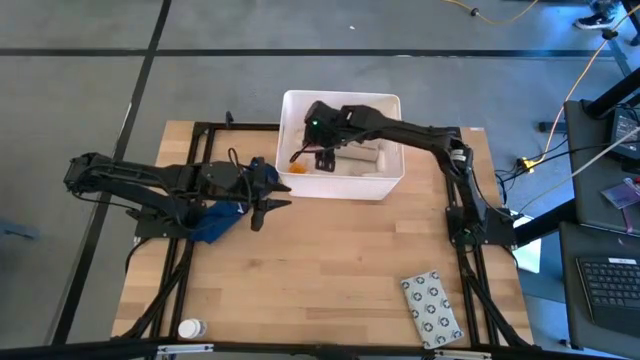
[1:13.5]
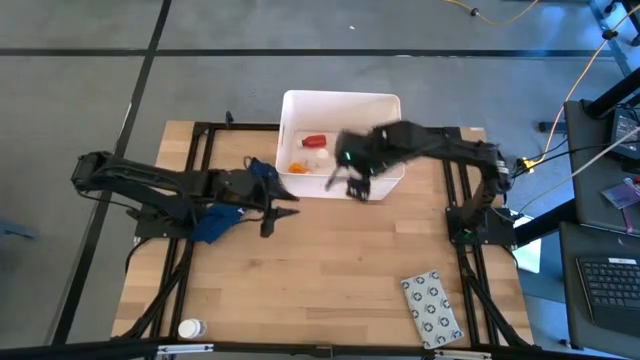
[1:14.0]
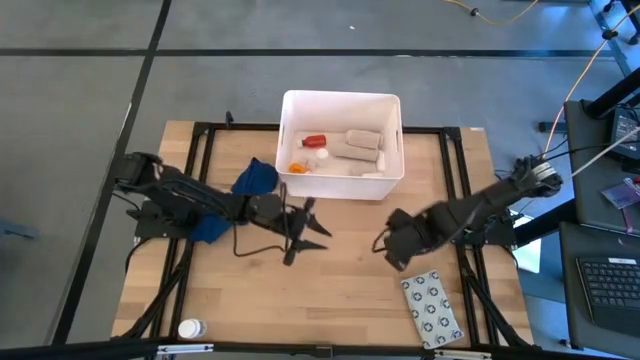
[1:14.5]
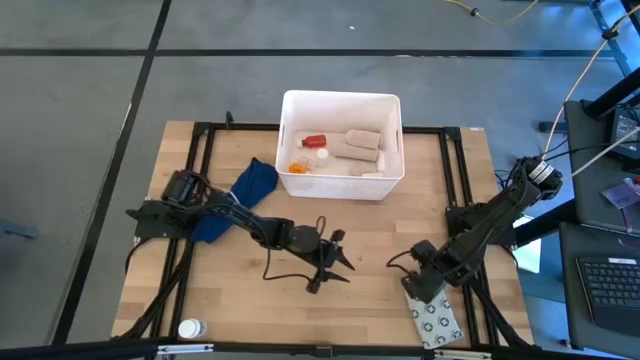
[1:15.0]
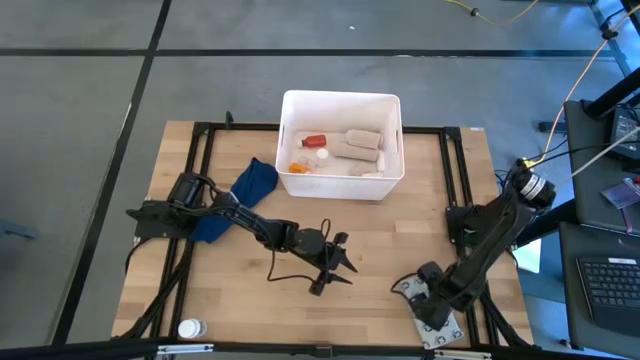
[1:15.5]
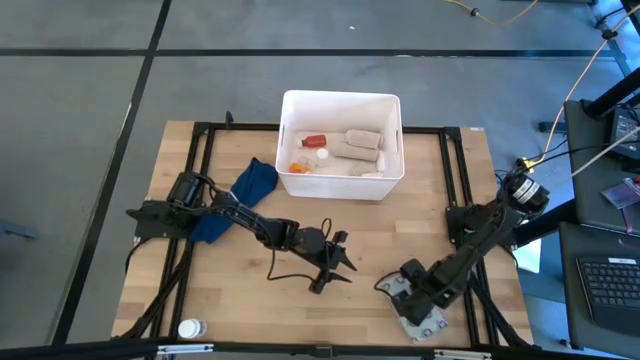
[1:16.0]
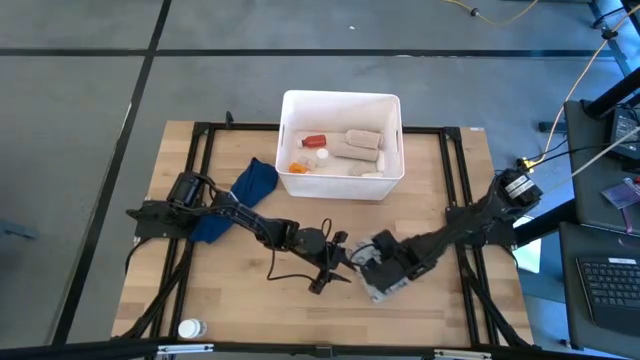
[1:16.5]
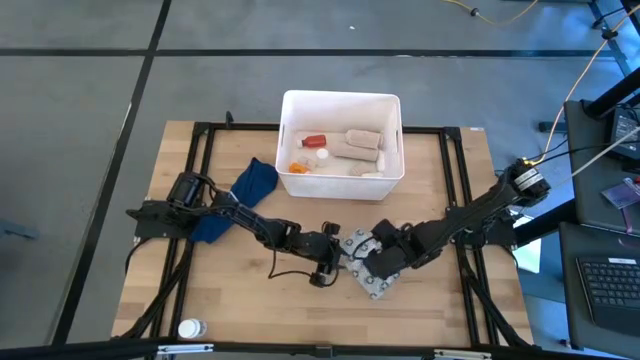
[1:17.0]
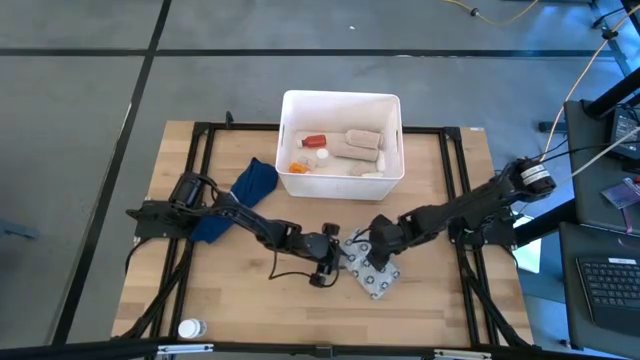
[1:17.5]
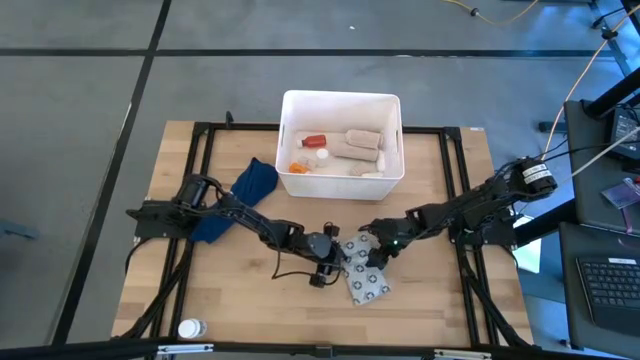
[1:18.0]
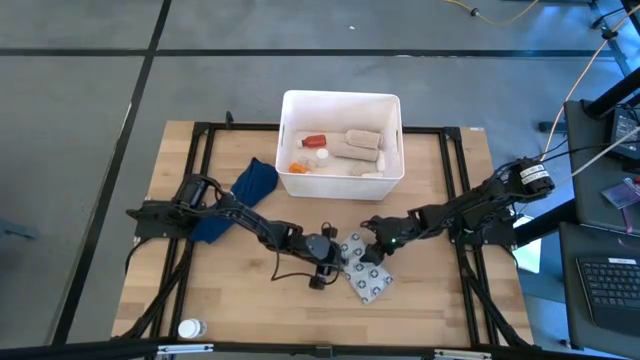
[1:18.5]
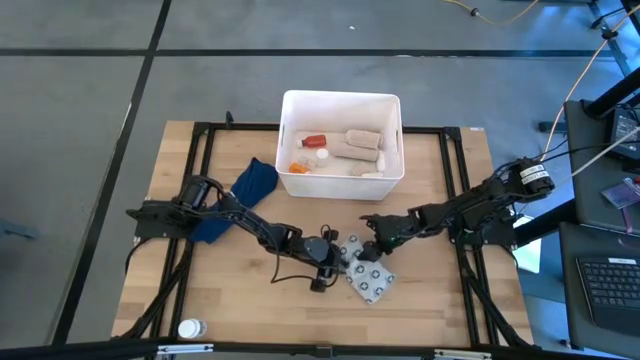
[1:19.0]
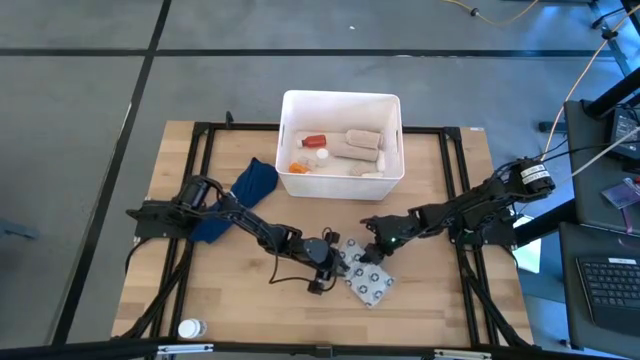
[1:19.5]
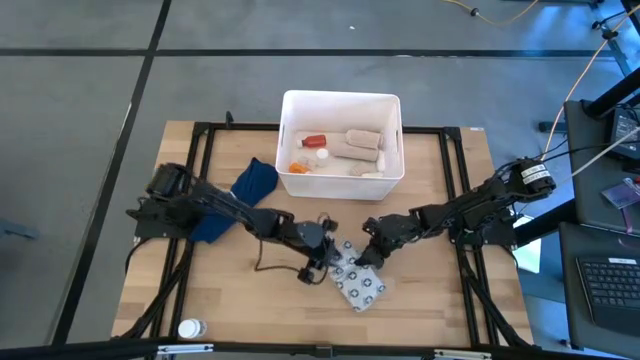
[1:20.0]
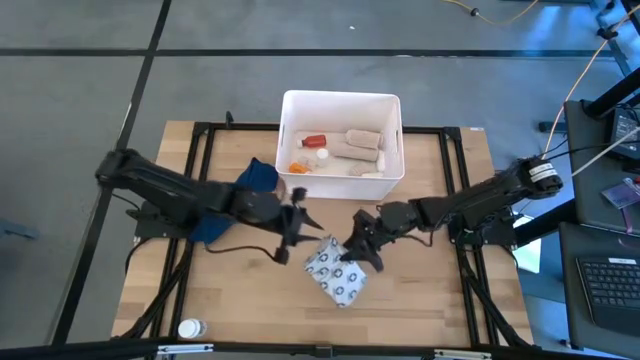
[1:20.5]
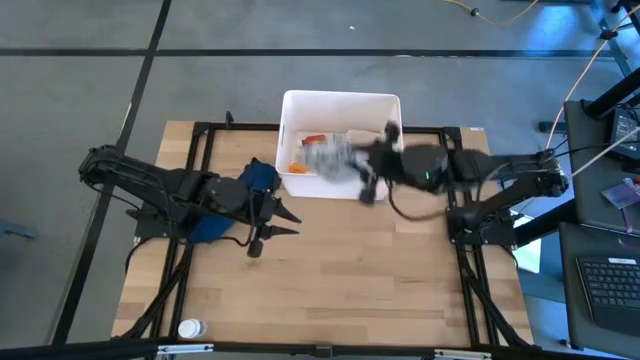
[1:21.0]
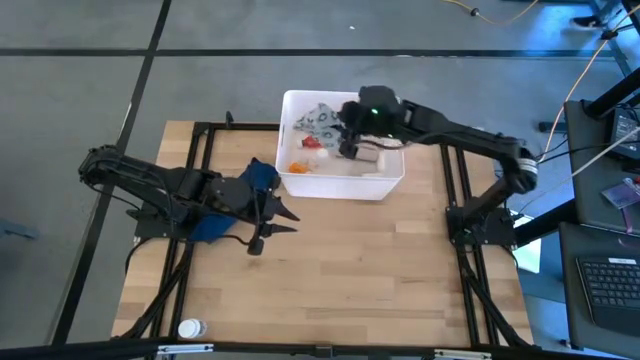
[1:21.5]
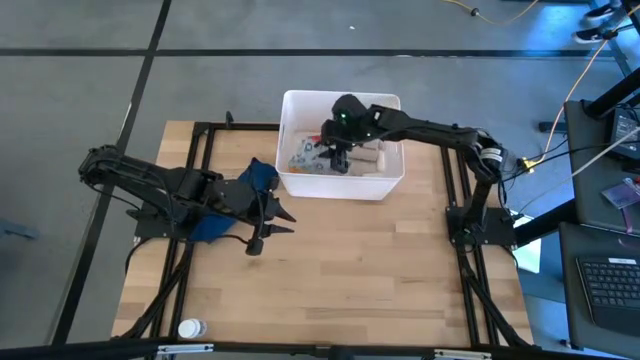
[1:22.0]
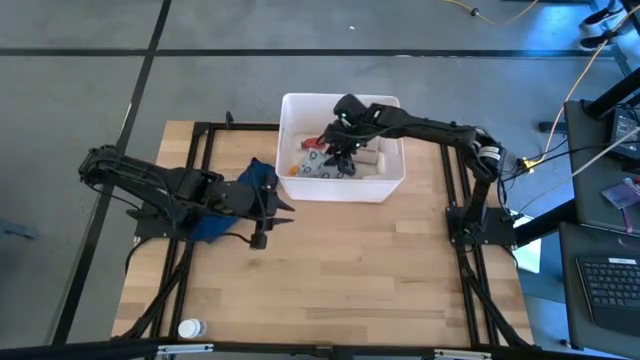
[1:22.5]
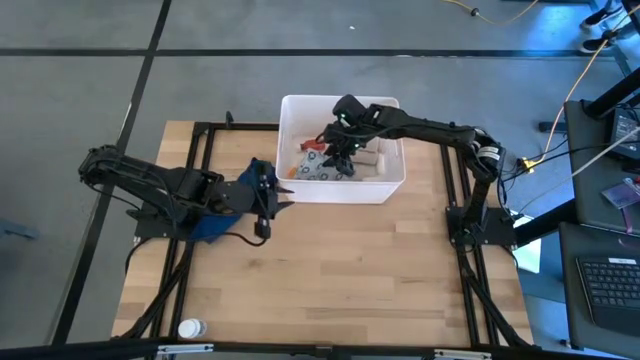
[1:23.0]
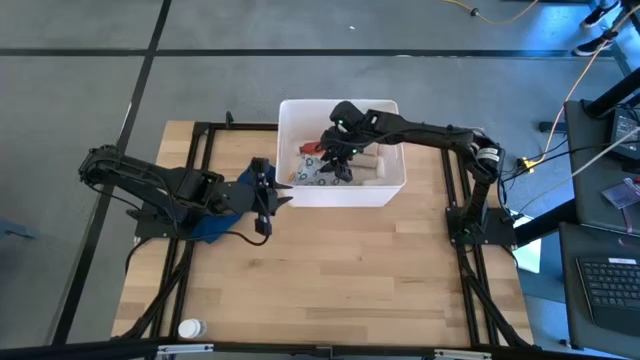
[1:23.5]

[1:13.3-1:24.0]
Task: Pick & place medical supplies in basket/bin
Put the light blue mailer bag into the white bin

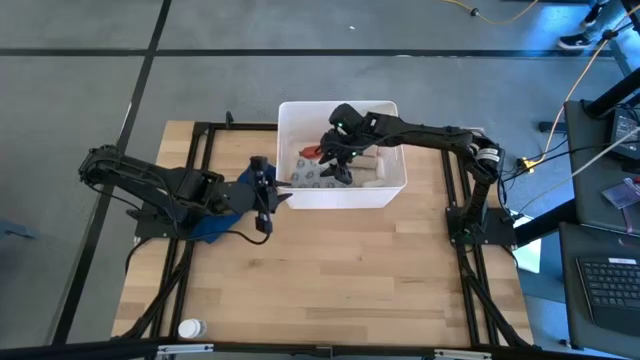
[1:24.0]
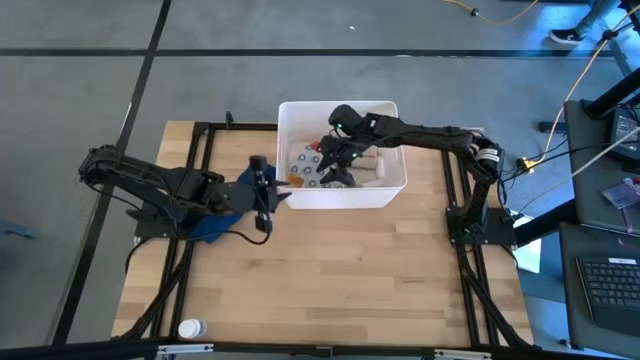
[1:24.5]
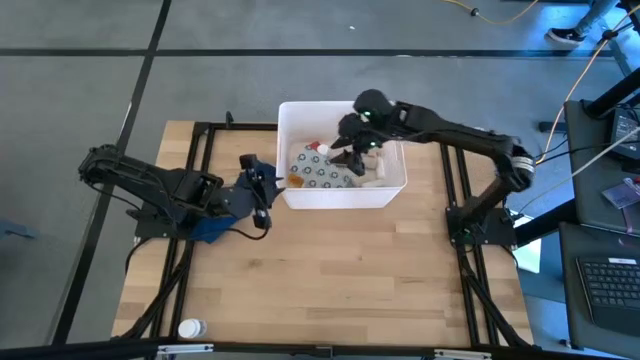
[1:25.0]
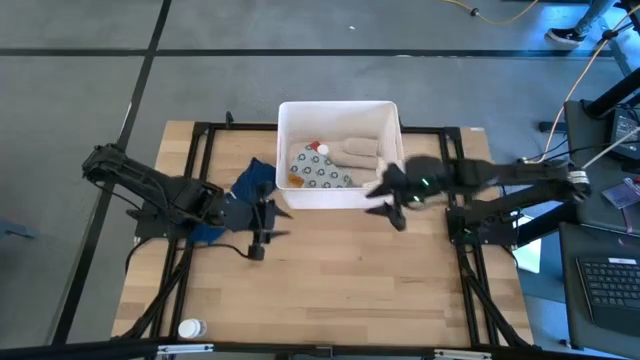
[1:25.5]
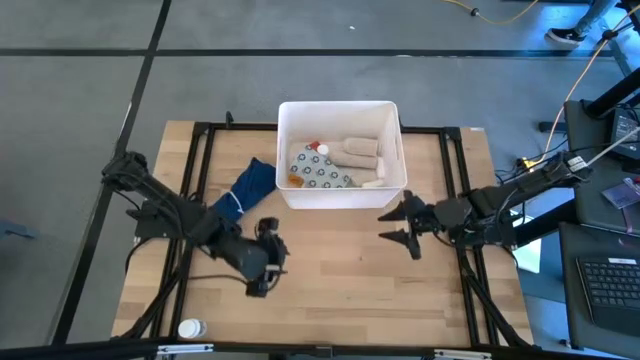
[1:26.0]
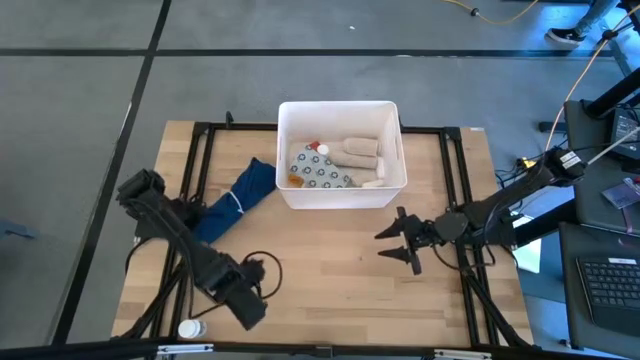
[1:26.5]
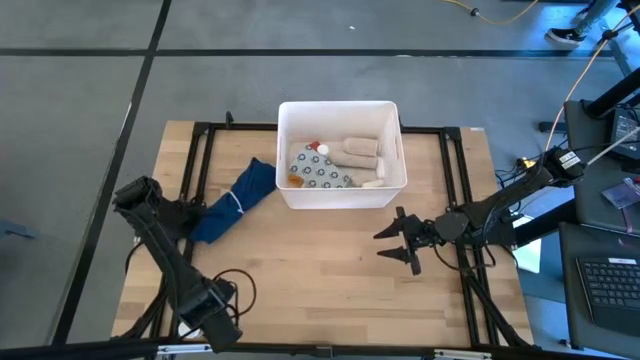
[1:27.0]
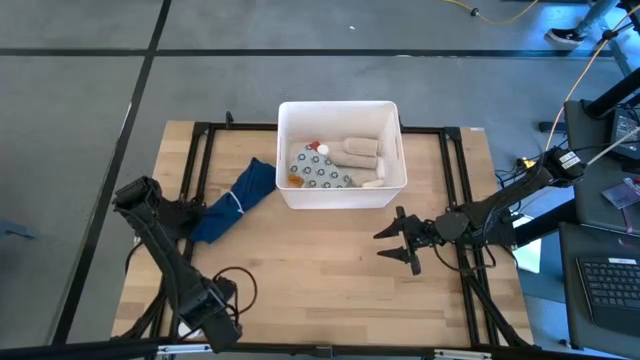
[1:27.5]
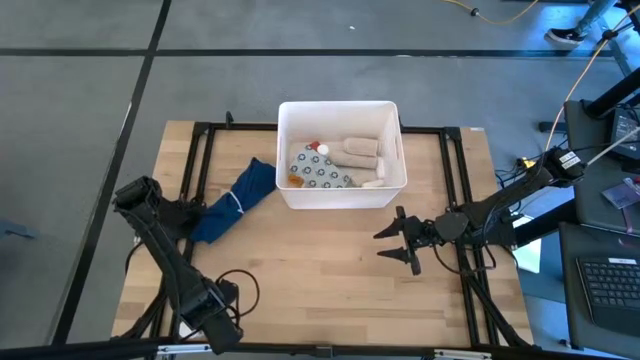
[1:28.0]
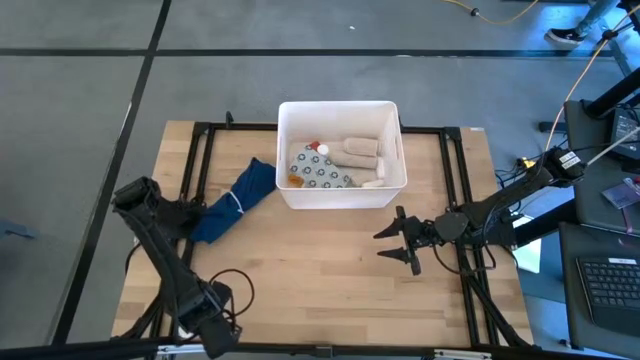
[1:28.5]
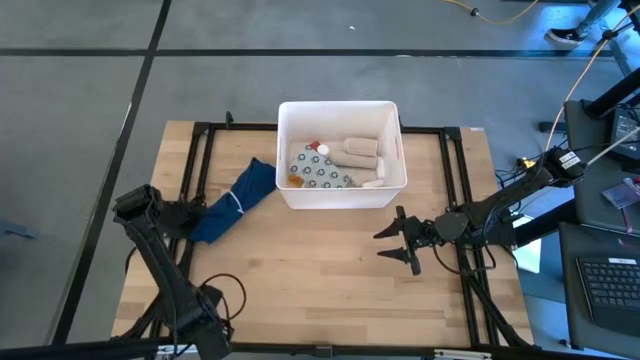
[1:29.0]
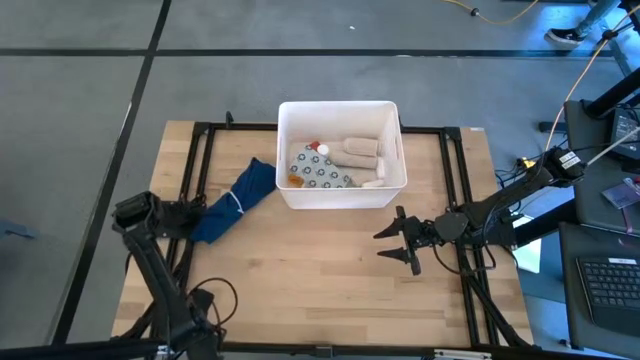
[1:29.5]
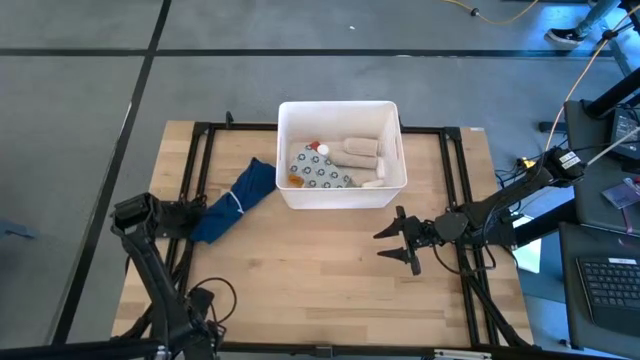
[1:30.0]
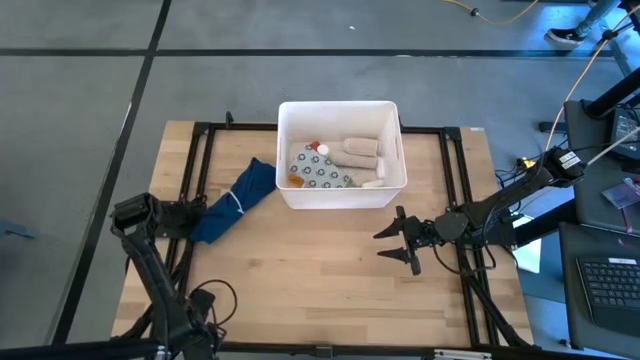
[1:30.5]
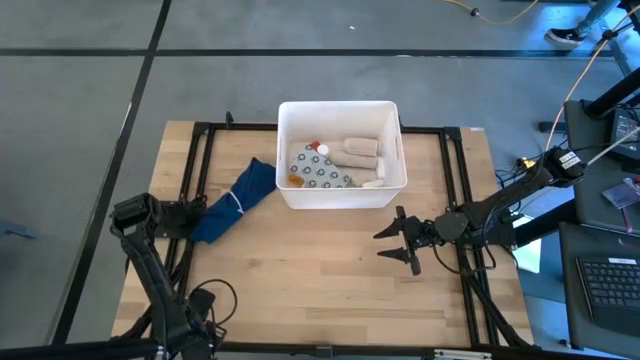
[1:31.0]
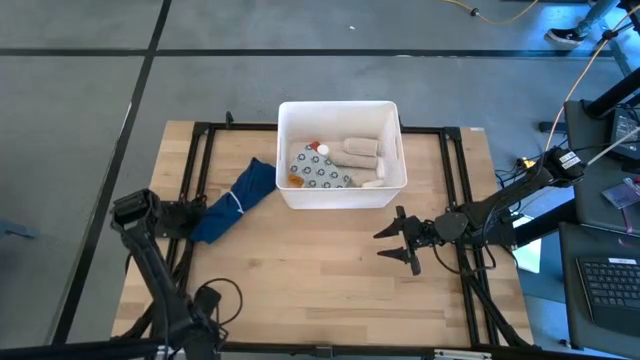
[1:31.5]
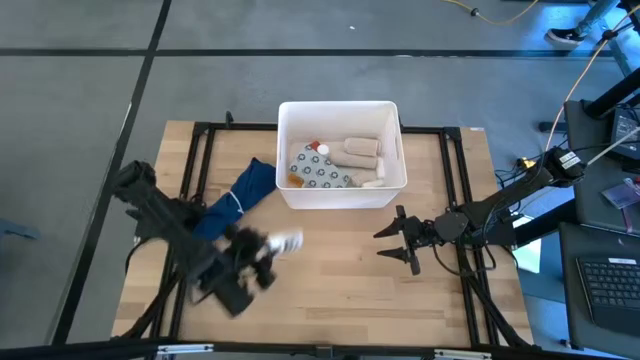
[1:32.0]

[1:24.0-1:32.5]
Put the white and green pill bottle into the white bin

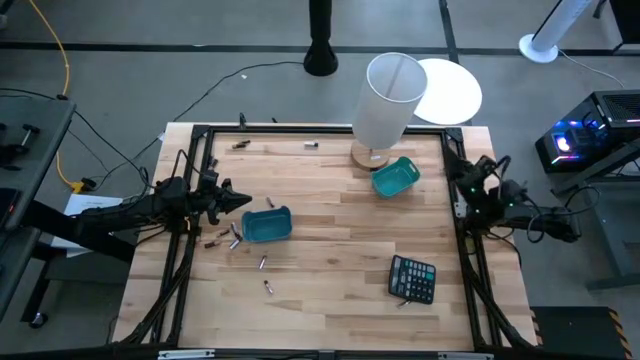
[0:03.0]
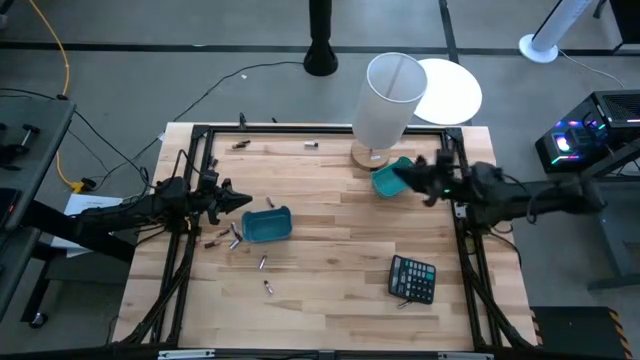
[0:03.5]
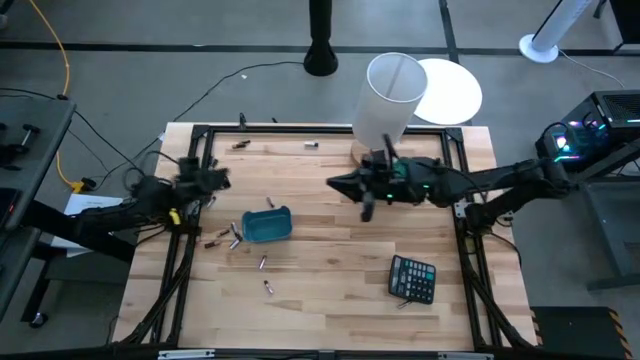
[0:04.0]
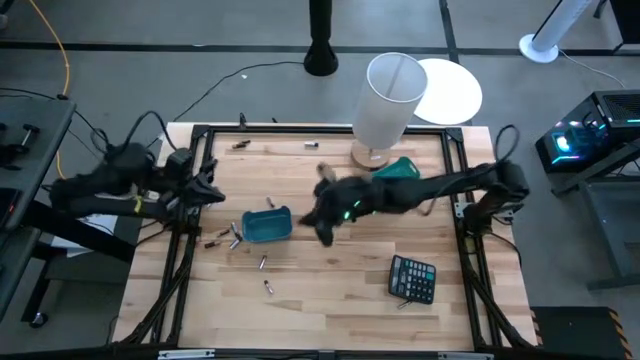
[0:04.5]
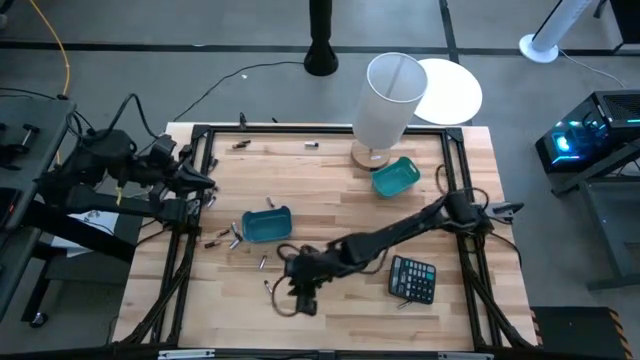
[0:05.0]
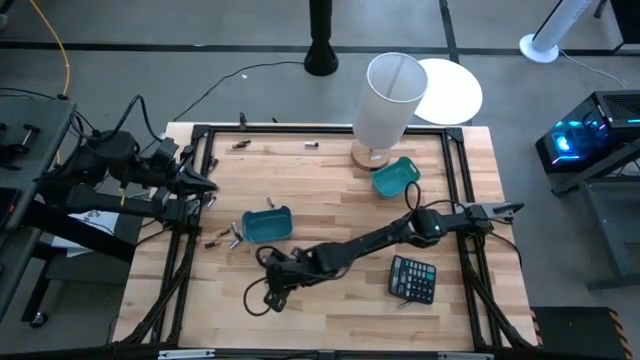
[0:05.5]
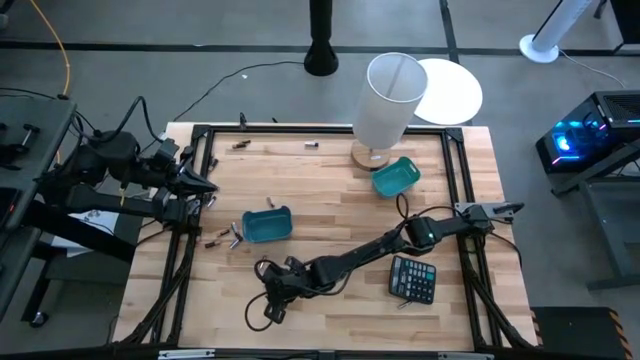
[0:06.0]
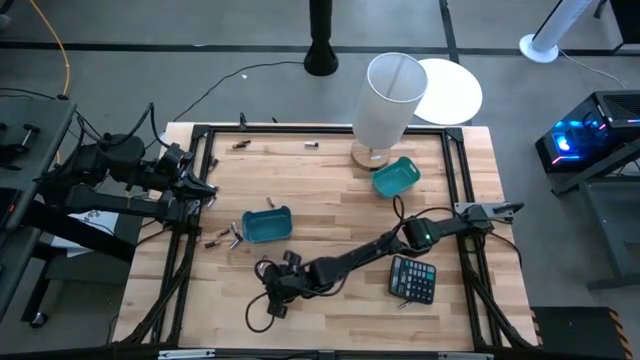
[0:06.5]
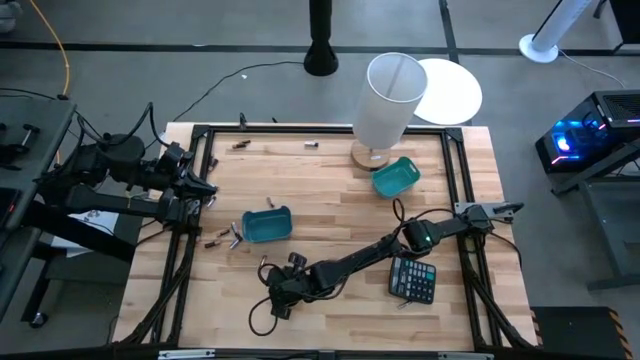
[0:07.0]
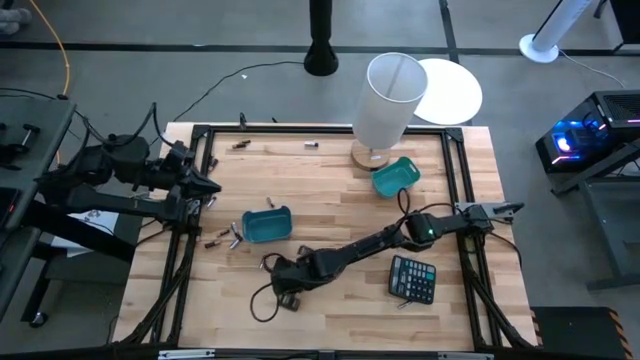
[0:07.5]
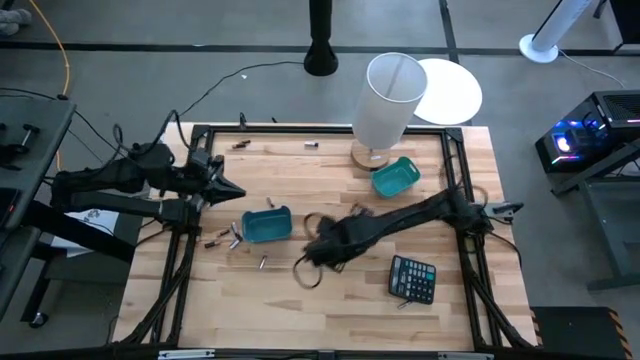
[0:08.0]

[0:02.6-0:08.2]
Task: Sort batteries
Put the silver battery into the green bin
